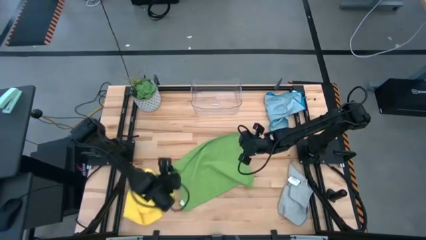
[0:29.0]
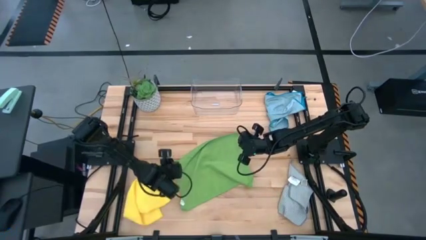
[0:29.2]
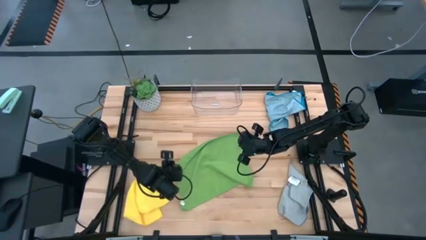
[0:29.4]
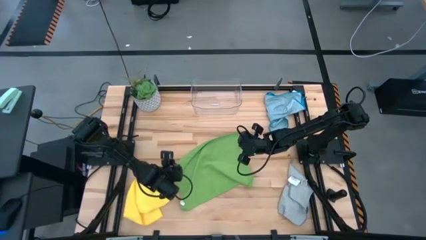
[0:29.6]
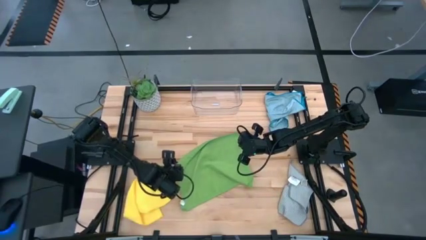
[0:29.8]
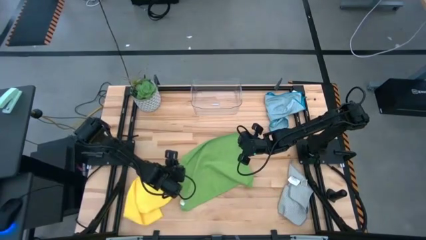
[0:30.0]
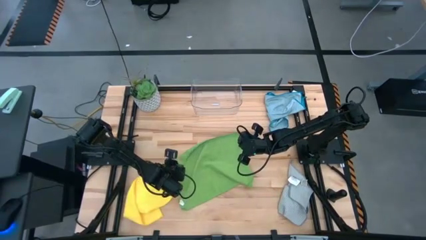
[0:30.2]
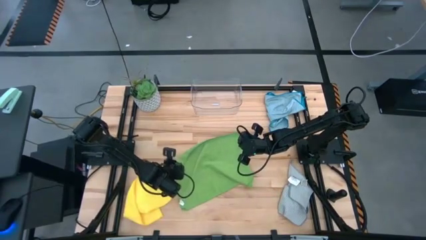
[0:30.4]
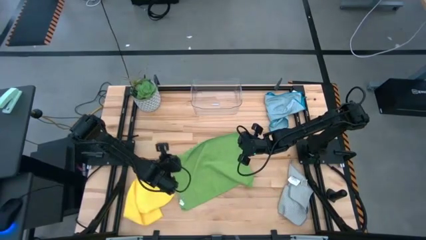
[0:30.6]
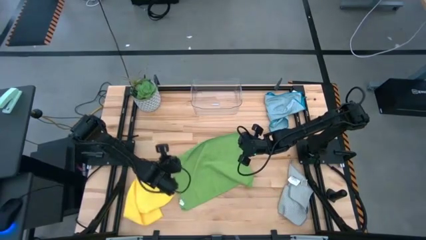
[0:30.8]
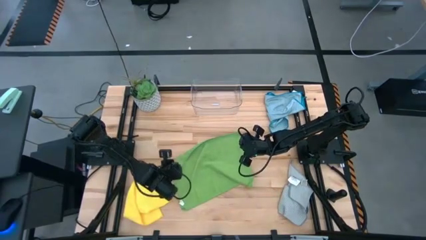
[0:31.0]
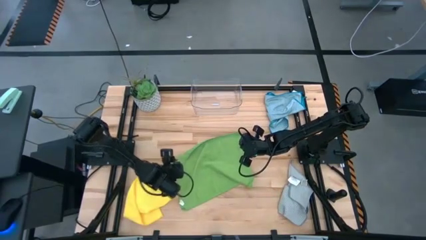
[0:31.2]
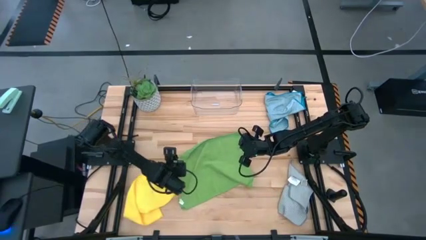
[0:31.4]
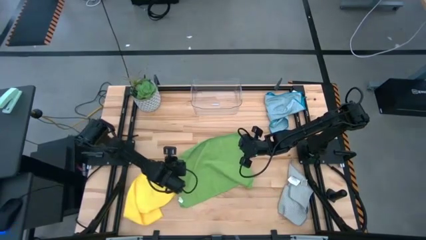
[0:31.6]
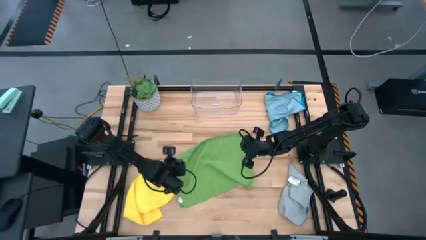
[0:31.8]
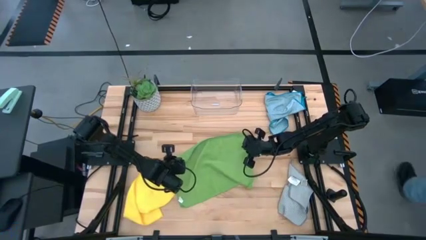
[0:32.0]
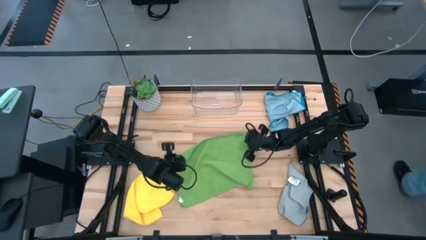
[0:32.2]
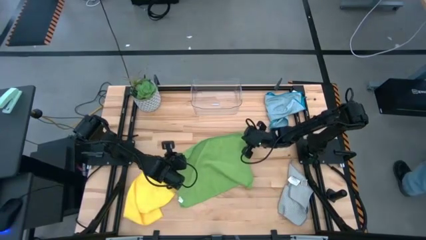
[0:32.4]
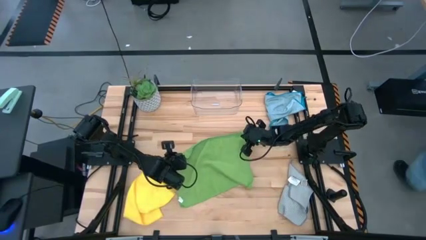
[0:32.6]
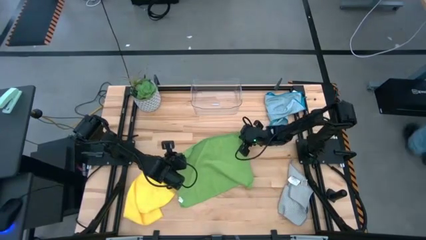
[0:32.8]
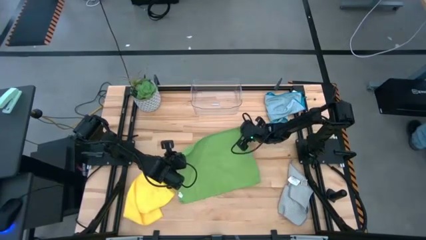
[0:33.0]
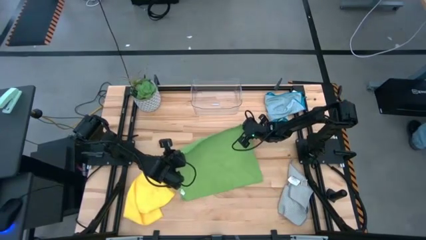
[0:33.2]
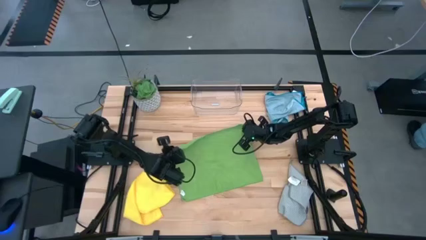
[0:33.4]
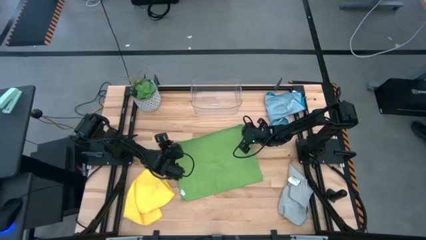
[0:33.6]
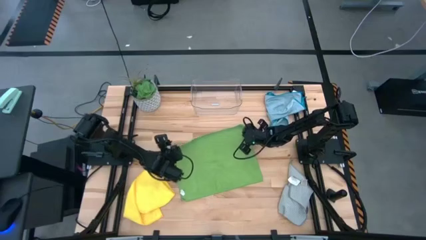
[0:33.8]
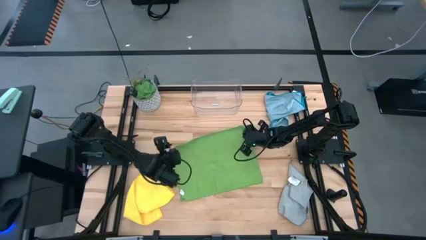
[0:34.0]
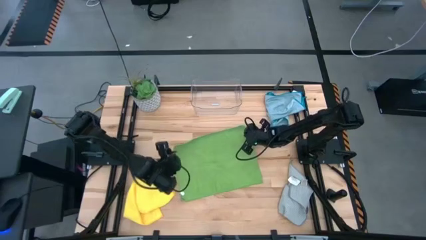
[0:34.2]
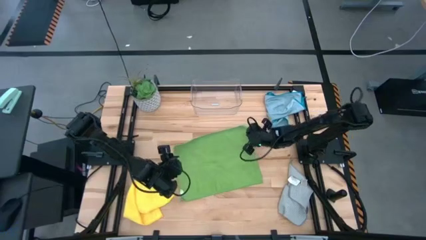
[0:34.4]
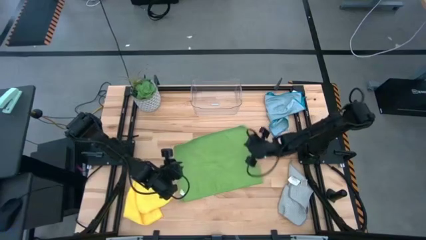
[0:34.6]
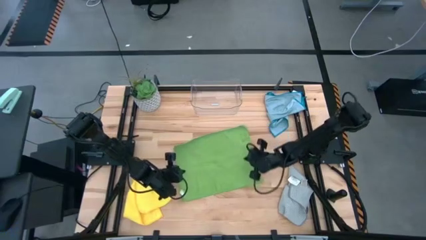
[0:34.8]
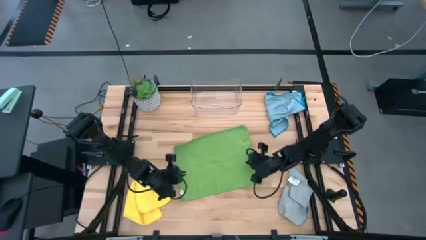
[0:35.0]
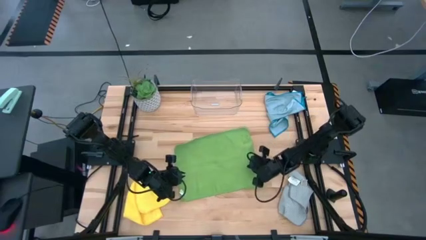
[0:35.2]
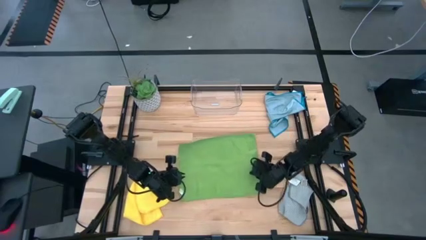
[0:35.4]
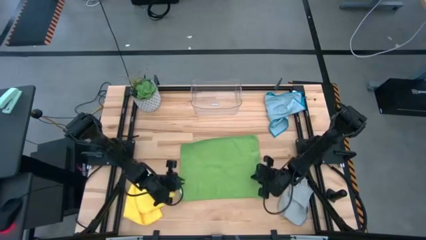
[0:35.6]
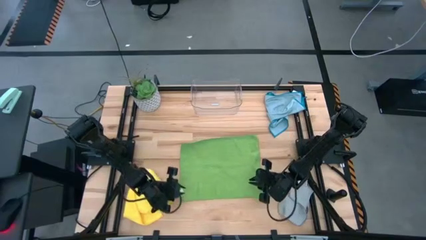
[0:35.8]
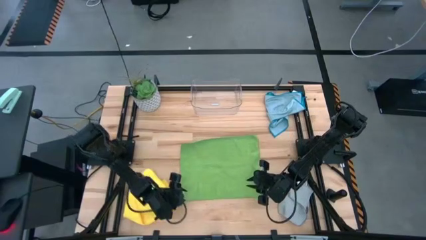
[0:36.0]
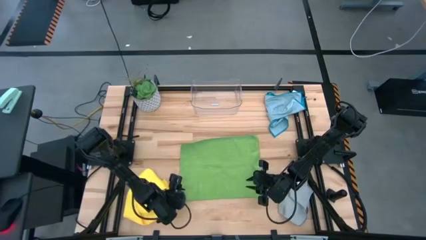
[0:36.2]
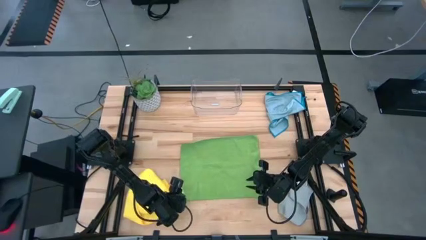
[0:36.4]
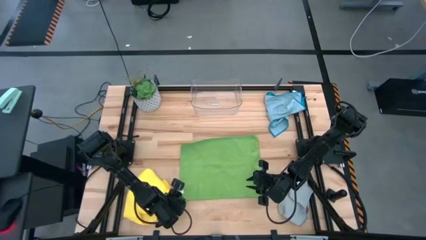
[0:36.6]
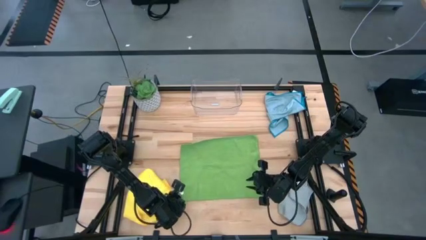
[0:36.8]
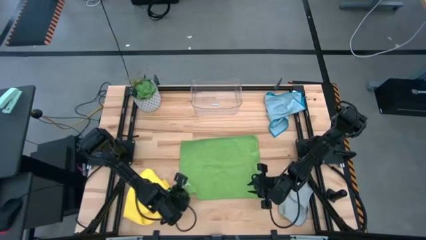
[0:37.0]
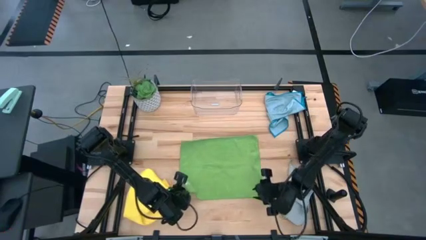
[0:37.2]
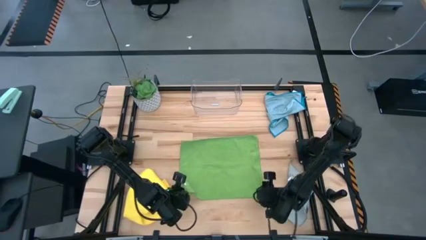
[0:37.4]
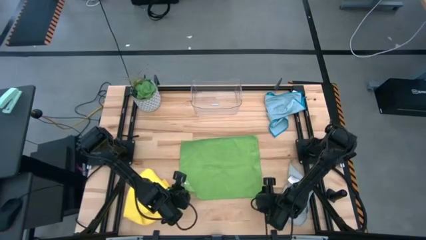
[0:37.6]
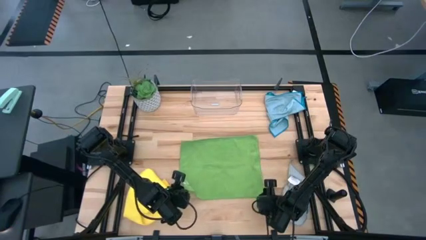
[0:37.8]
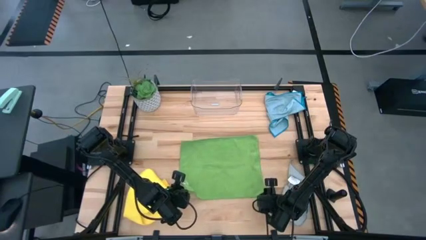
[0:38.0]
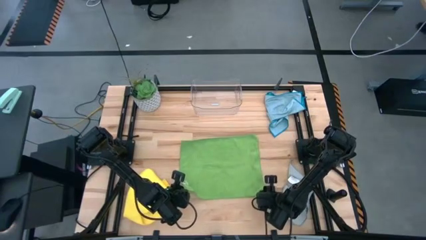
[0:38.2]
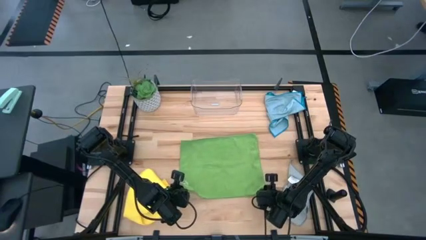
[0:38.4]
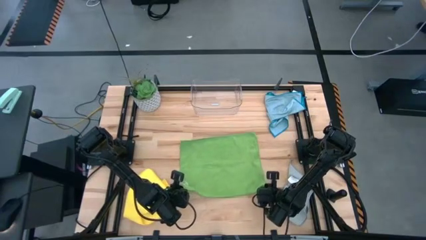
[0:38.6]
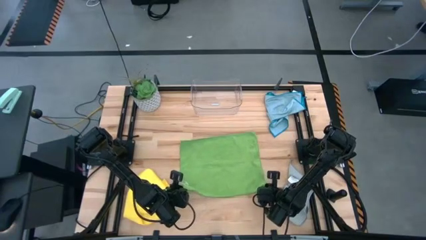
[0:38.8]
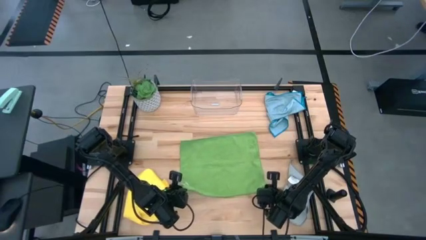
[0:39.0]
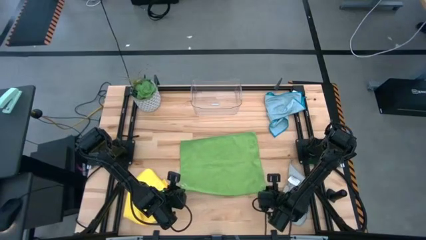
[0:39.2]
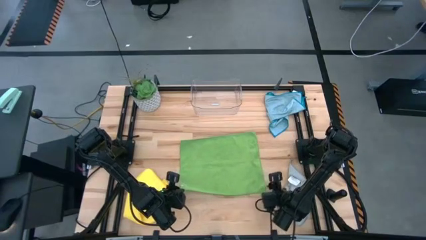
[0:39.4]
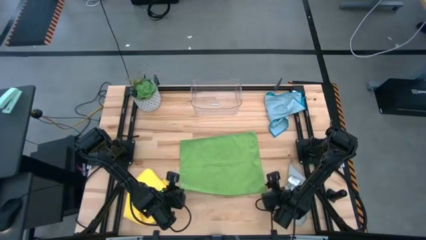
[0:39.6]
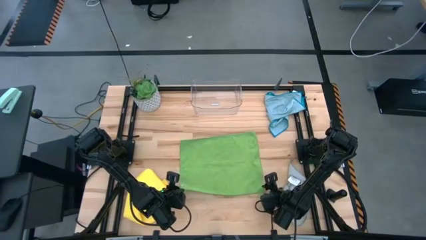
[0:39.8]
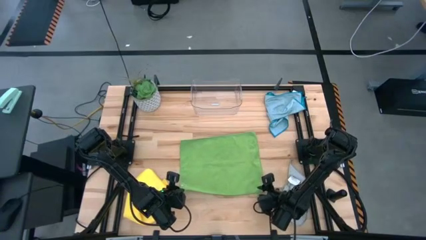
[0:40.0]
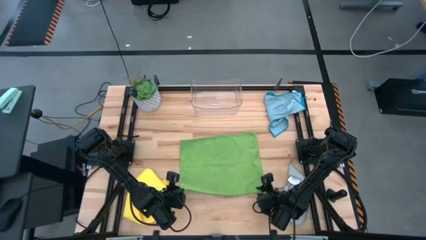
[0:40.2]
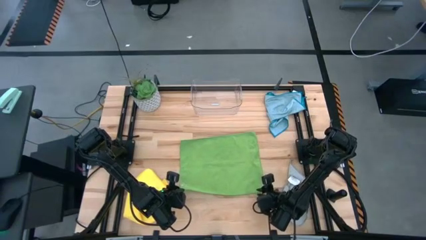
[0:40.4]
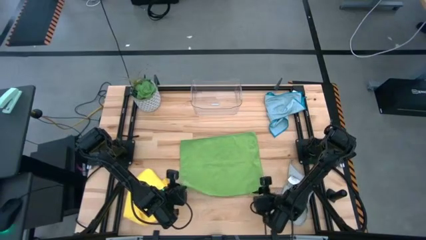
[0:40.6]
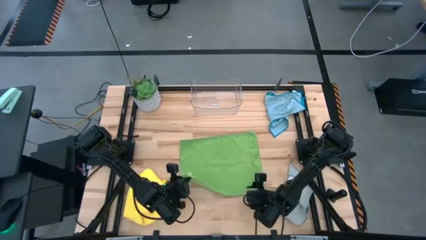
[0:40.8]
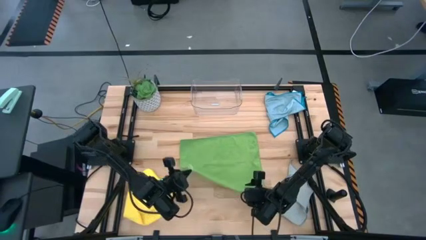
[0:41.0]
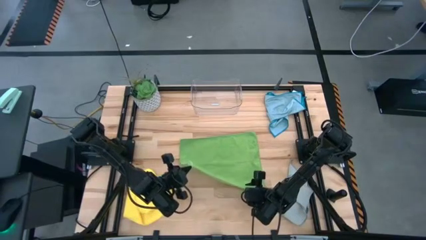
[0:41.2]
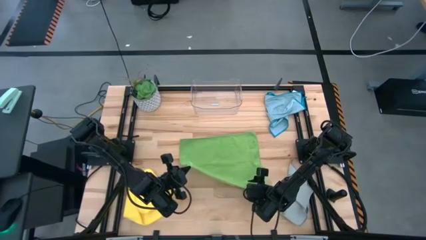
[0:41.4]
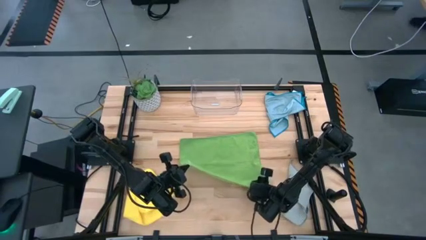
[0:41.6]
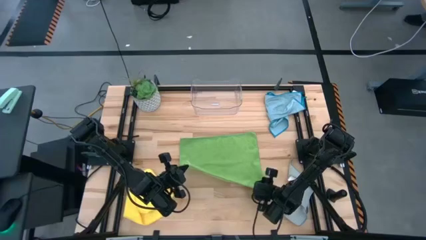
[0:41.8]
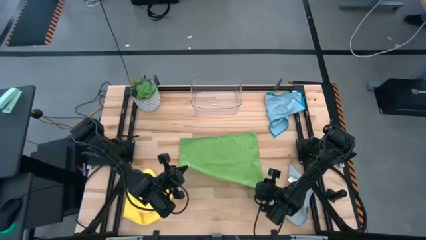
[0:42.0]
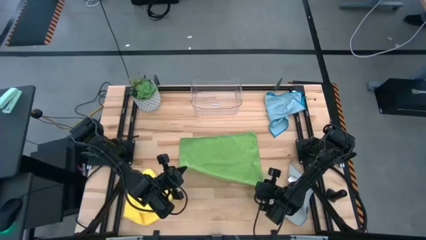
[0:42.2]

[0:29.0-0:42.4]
Task: Fold microfiber towels
Fold the green microfiber cloth

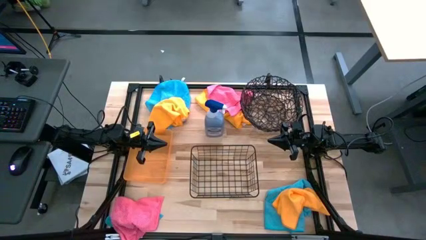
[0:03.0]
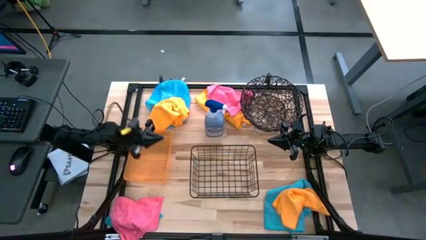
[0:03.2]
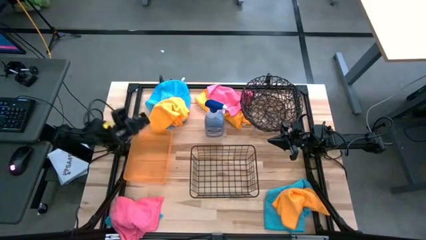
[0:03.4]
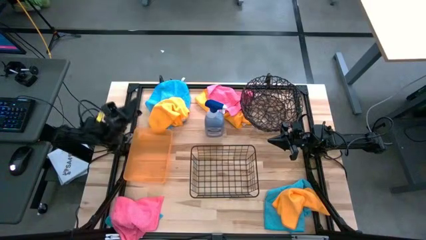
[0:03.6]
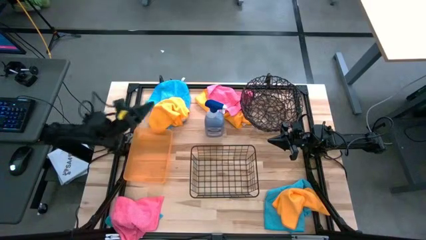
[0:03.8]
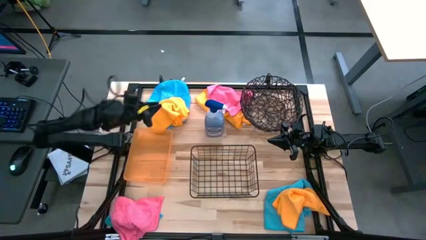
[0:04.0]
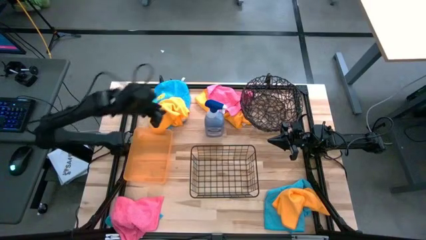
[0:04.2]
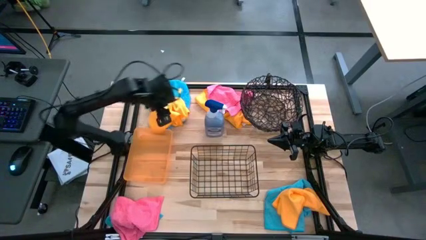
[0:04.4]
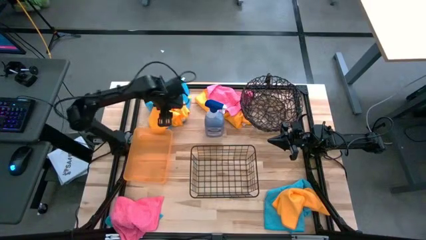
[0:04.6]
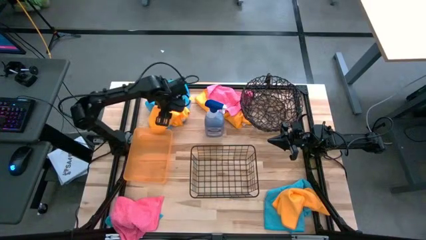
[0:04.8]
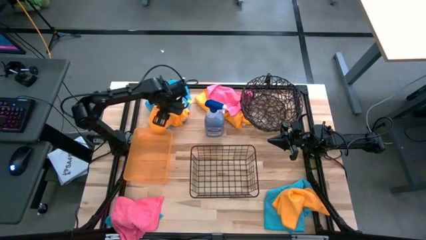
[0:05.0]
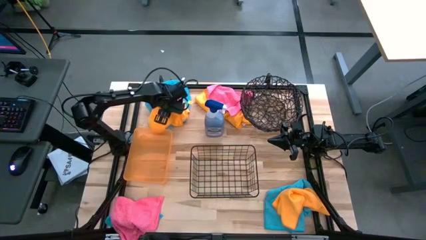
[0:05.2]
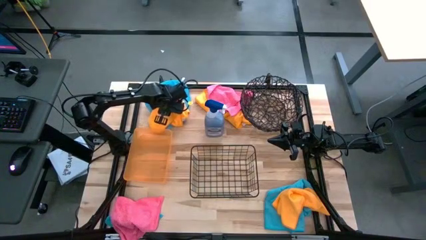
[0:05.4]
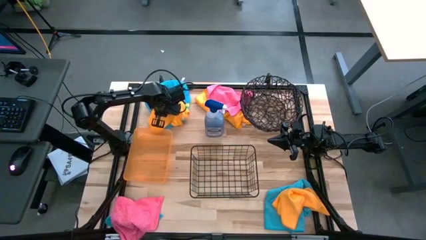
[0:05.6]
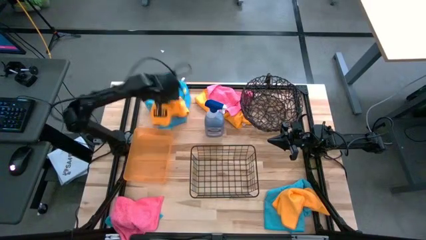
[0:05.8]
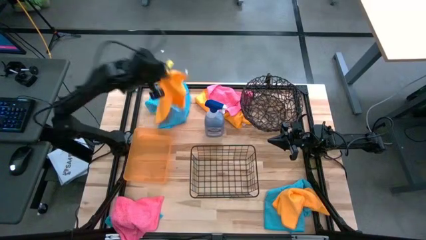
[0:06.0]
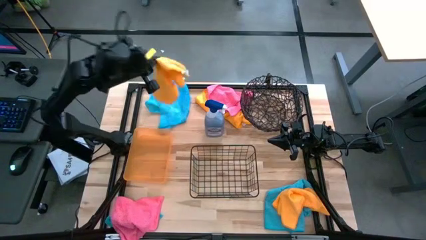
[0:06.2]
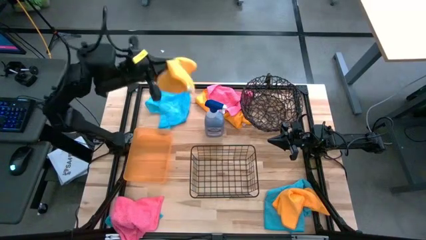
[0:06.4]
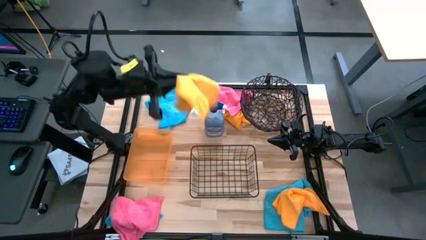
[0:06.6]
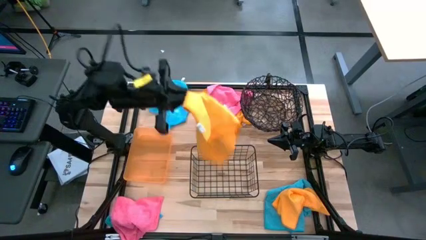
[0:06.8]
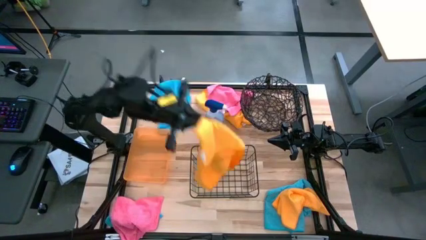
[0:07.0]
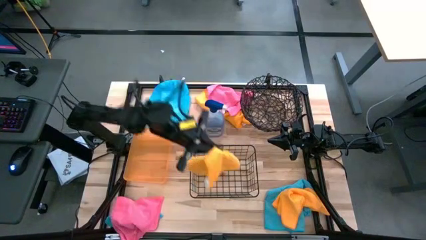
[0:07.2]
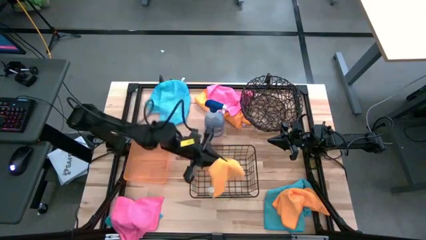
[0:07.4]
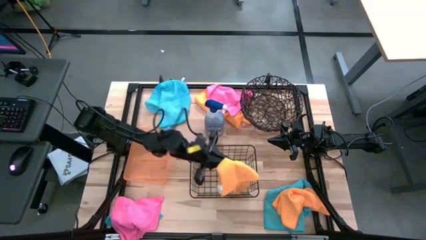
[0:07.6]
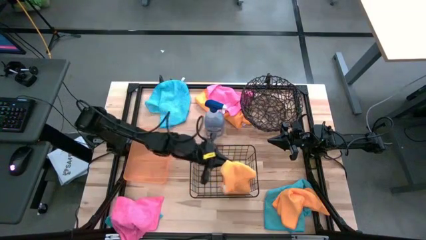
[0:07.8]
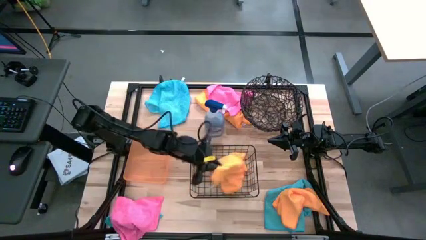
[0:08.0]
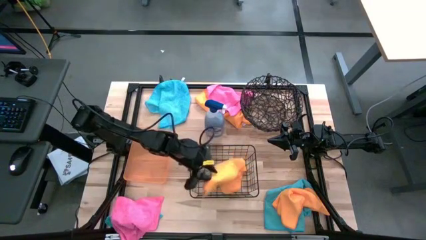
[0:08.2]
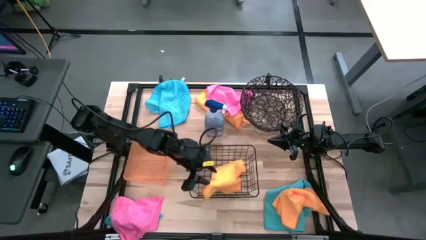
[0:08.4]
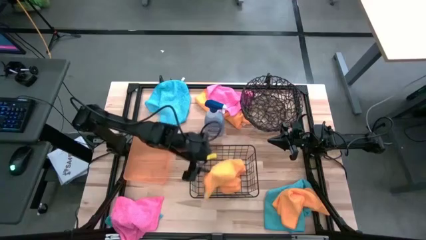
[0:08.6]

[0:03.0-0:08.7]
Task: Sort microfiber towel by color & place in baskets
Put the left yellow microfiber towel into the wire basket
